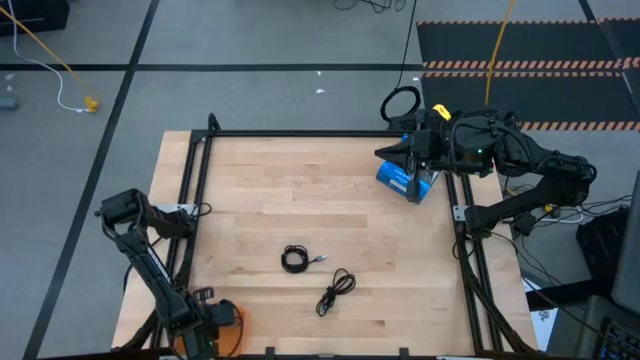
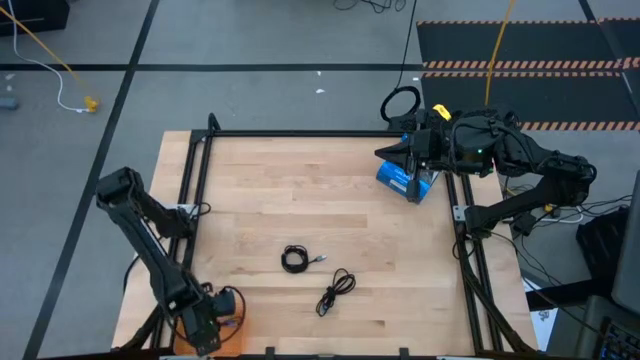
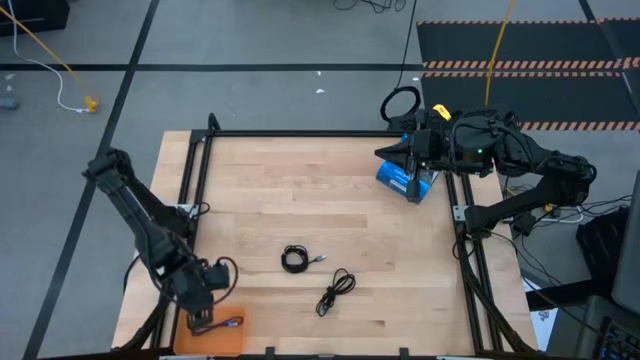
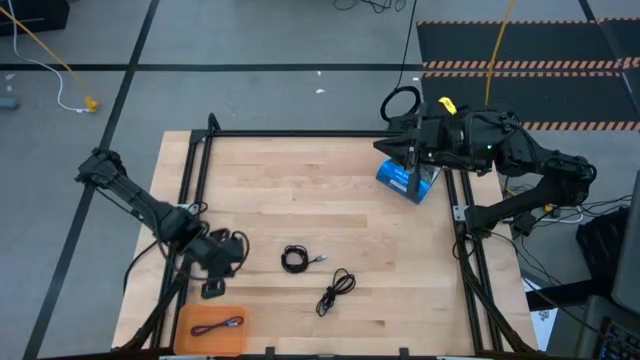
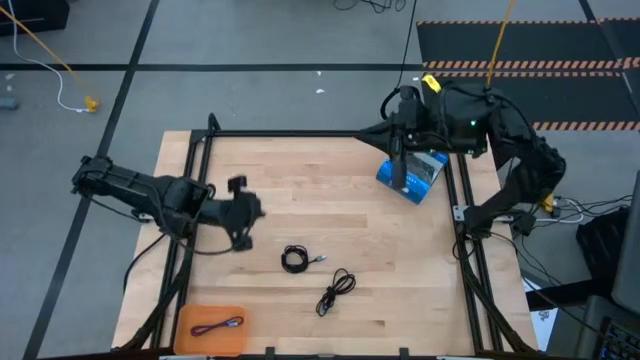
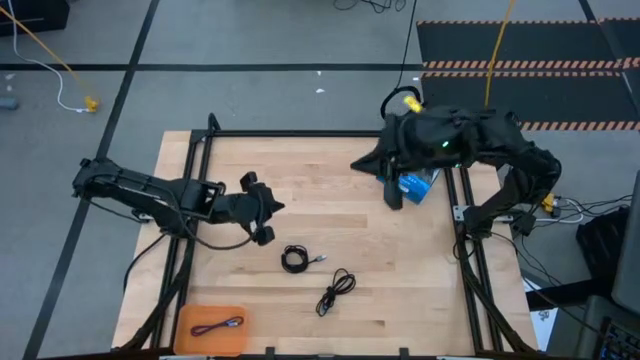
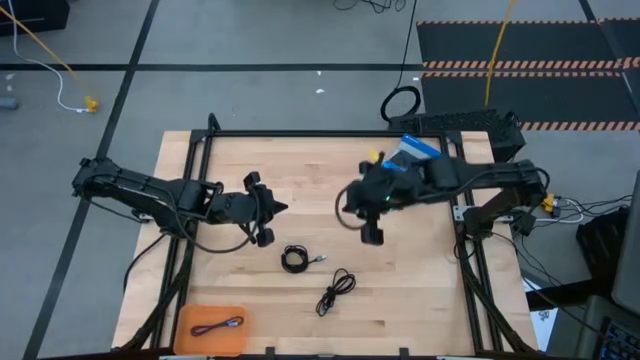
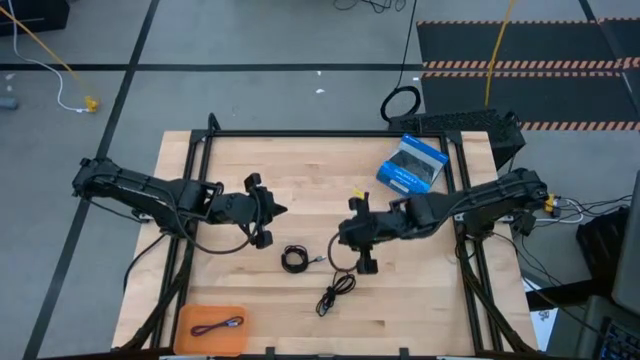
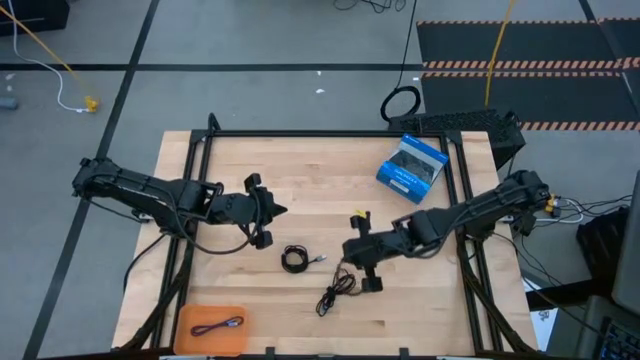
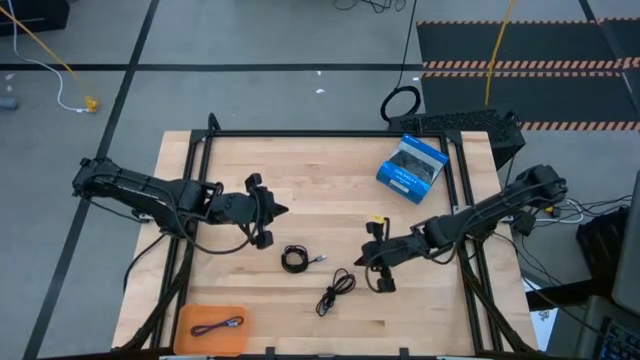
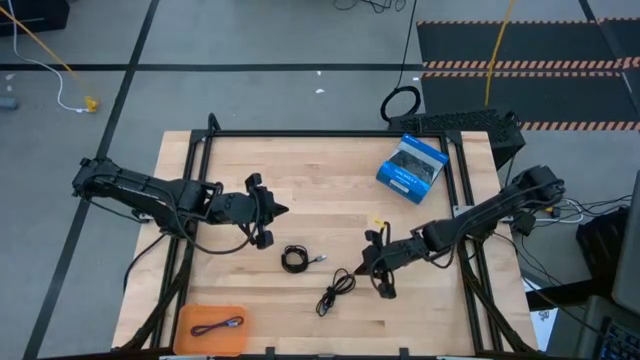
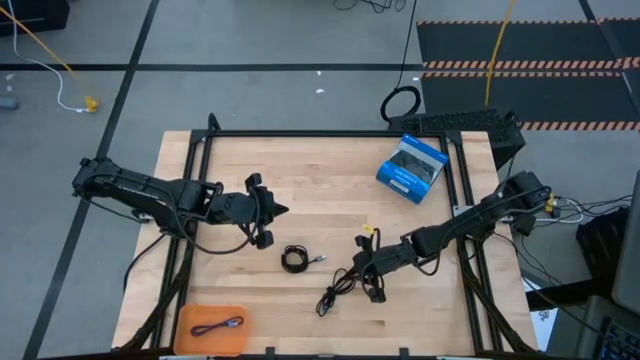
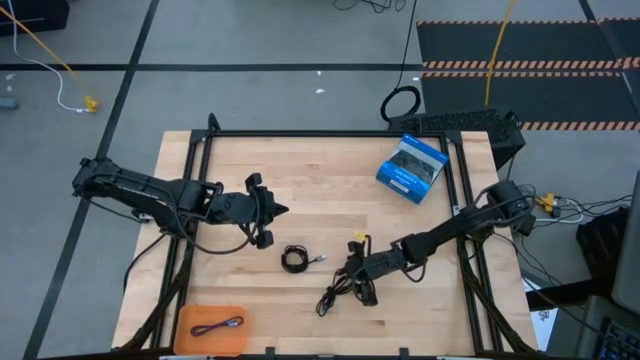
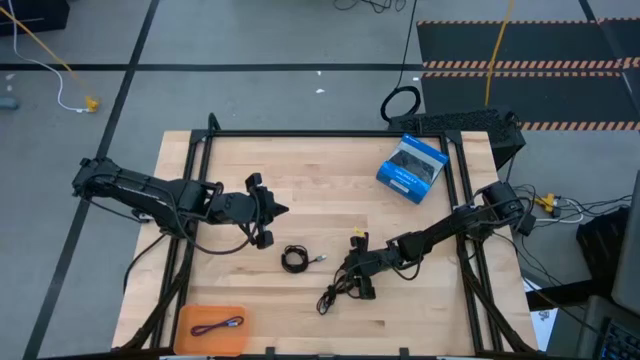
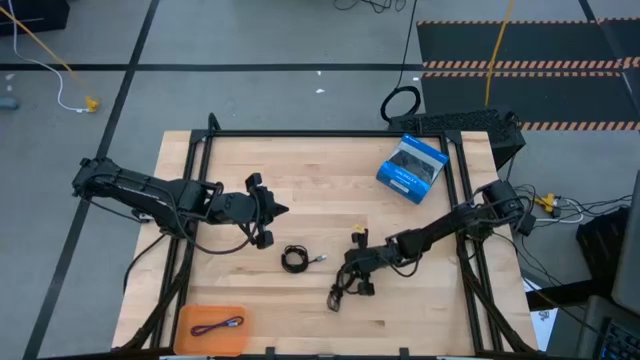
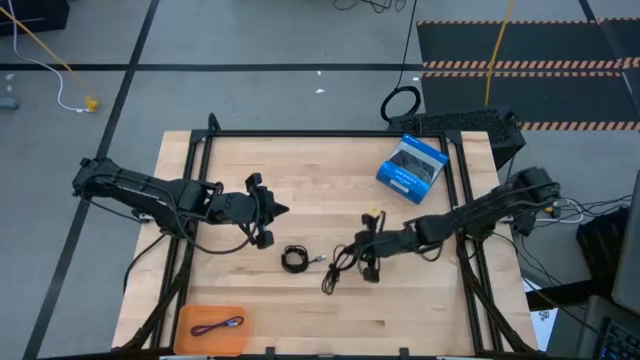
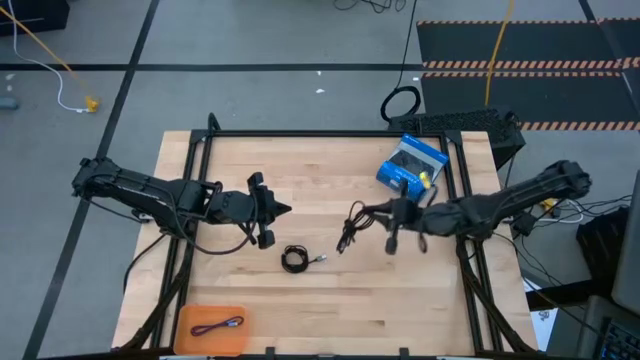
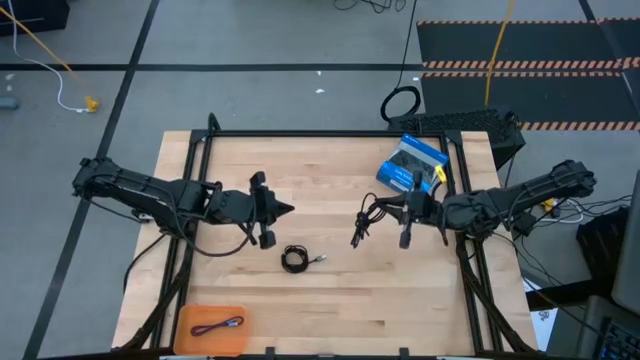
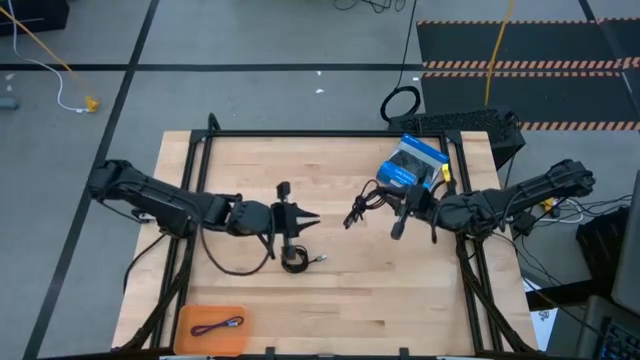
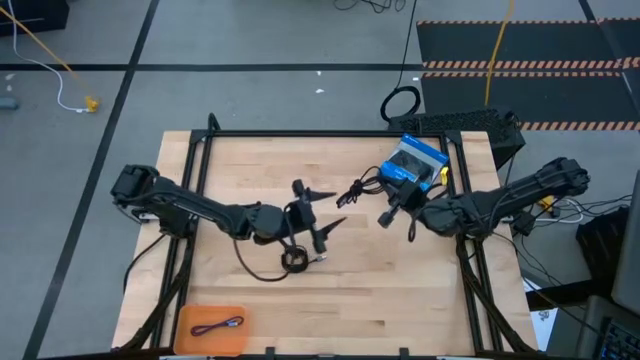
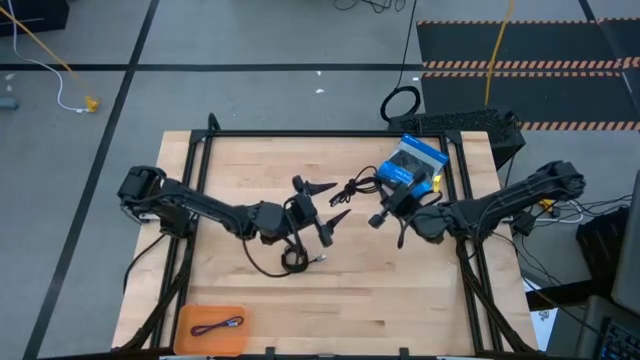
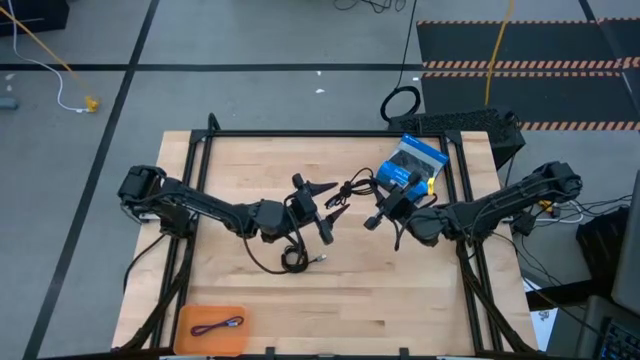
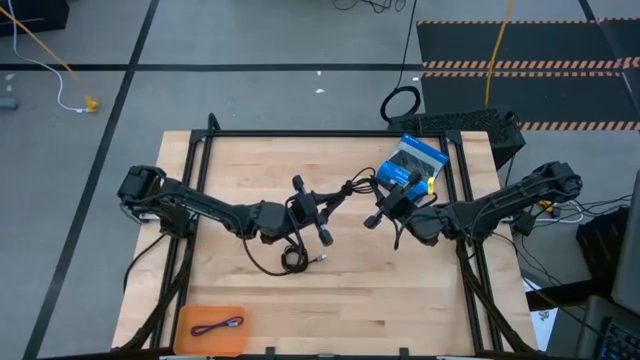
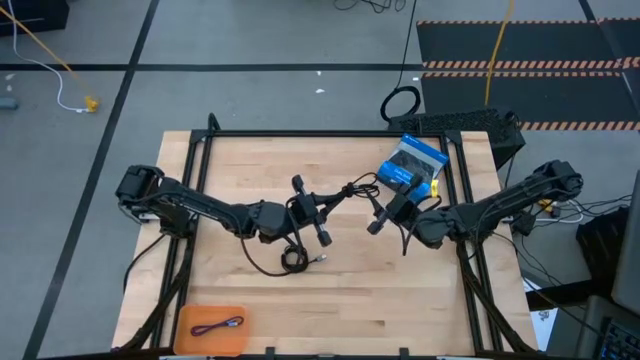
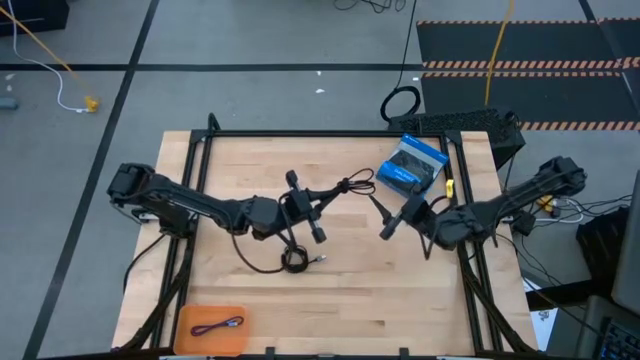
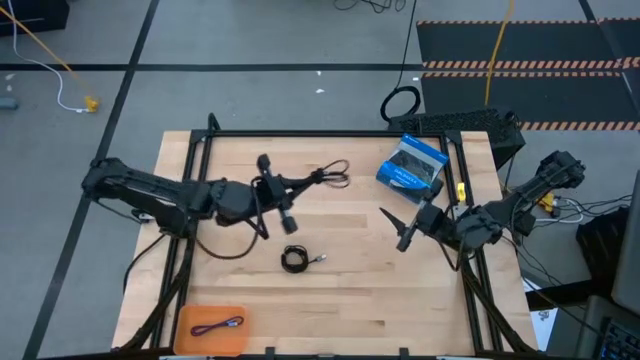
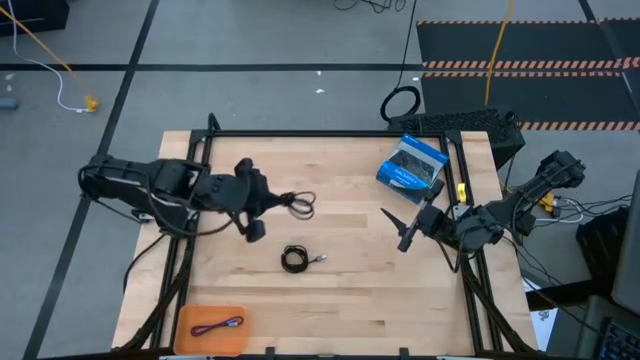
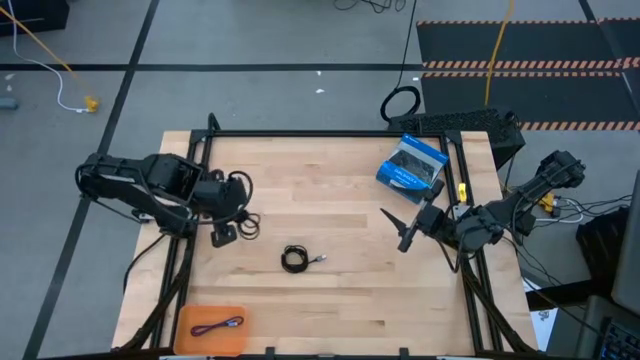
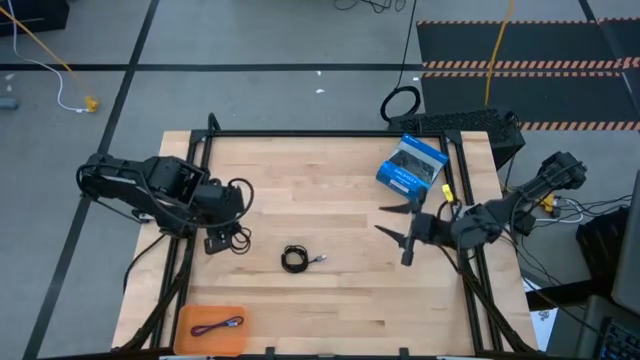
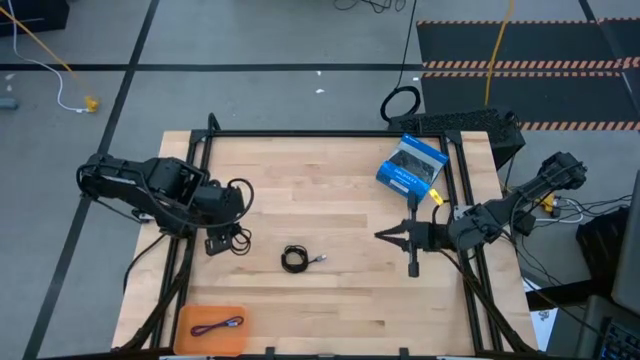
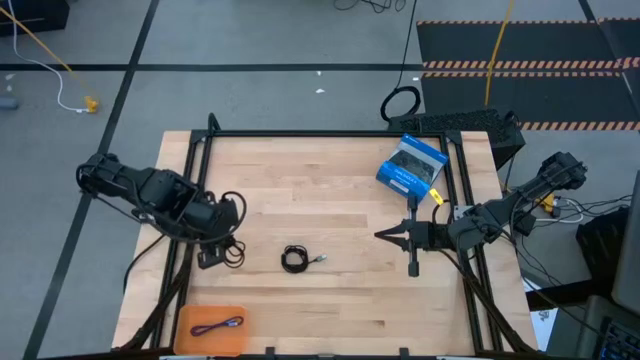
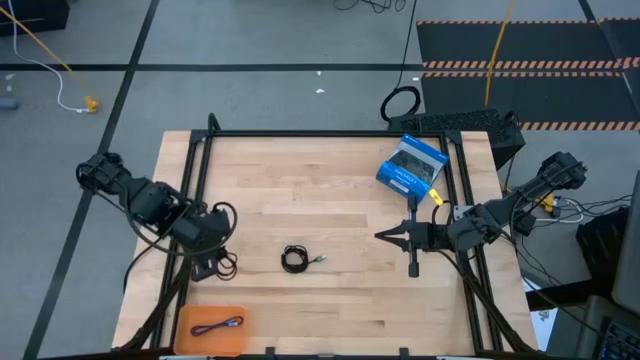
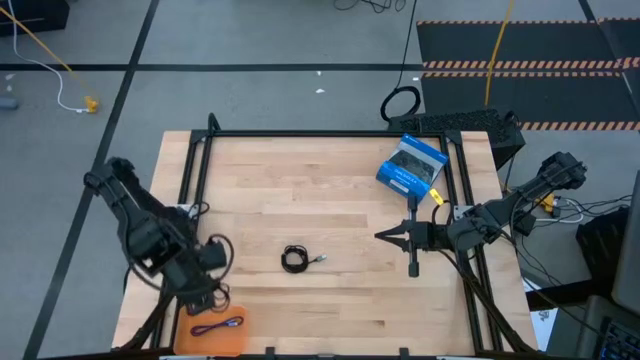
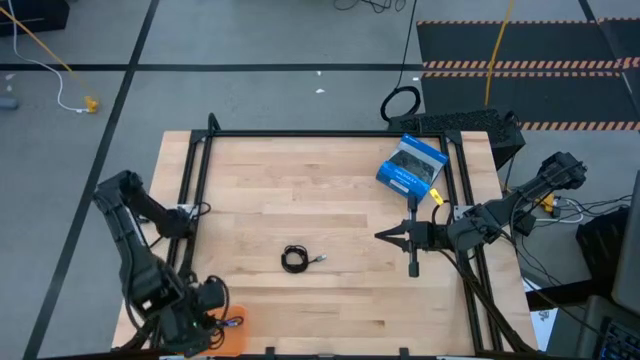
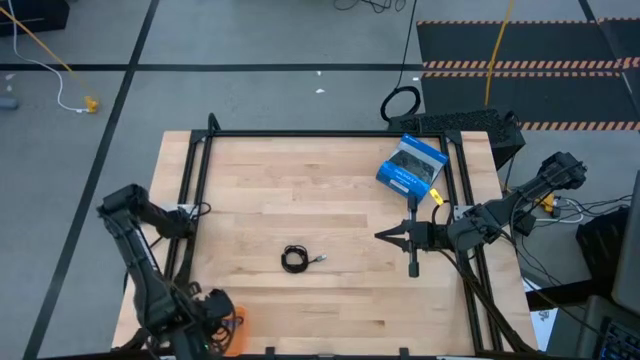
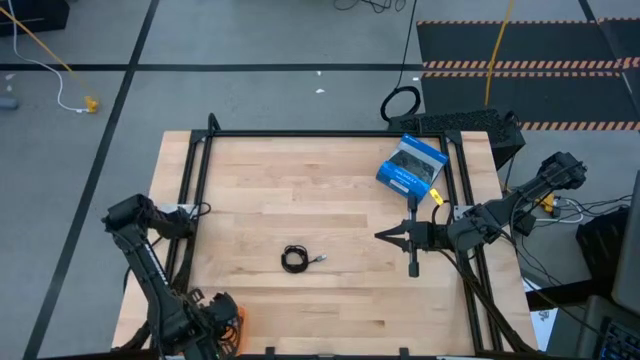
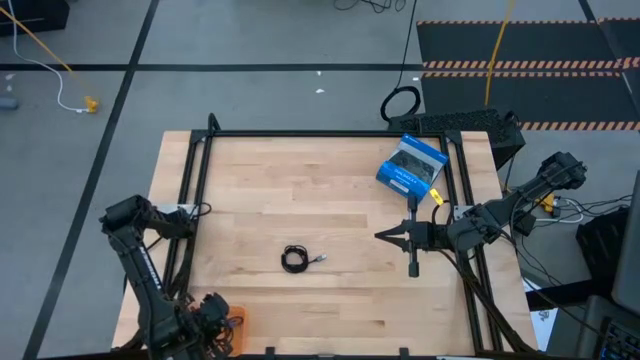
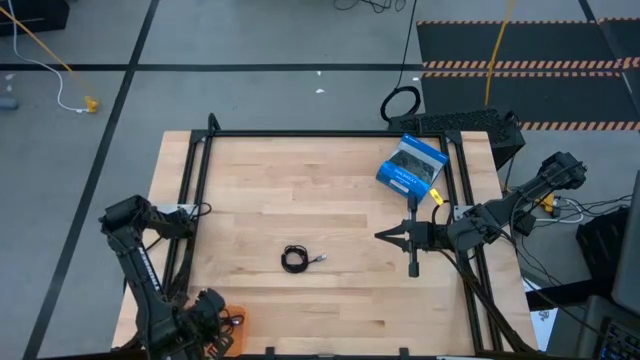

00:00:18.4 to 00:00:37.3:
Task: Pick and place USB-C Cables
Put the bottom black cable charger into the orange bin

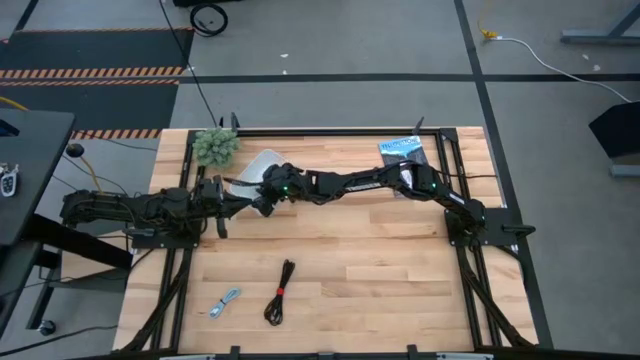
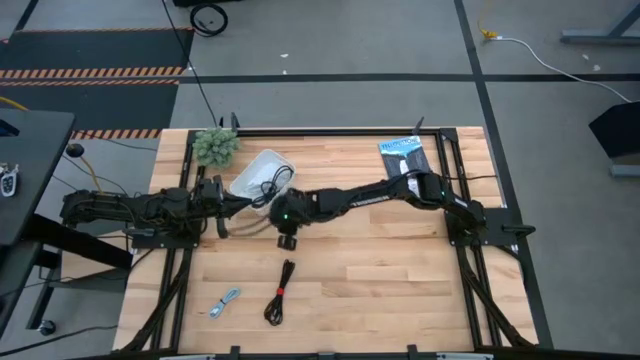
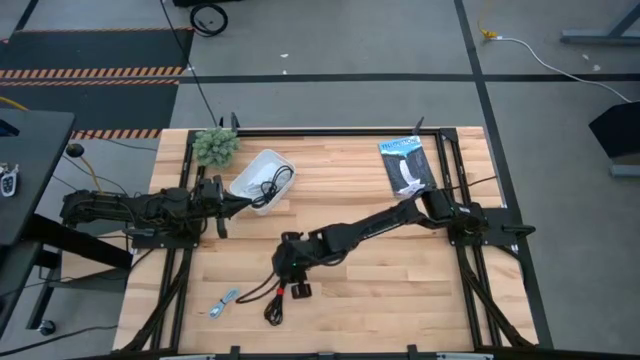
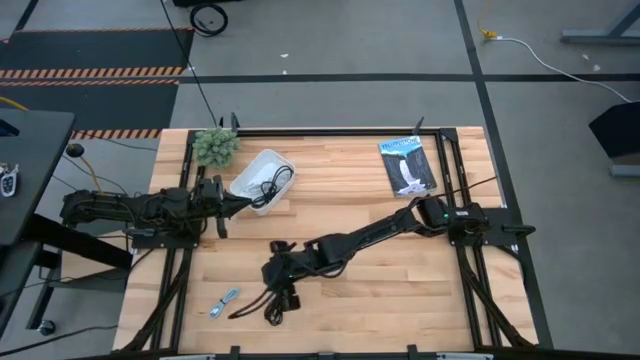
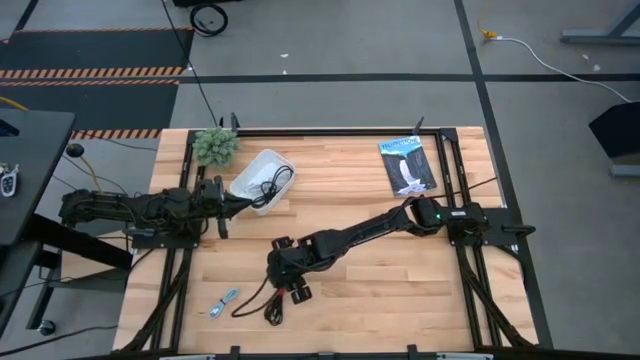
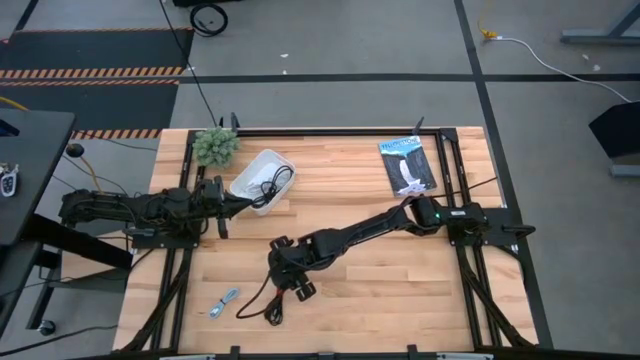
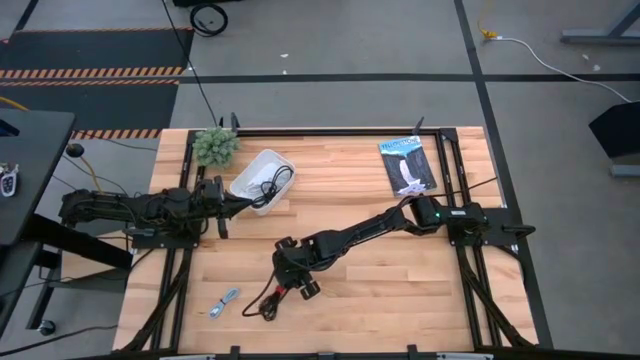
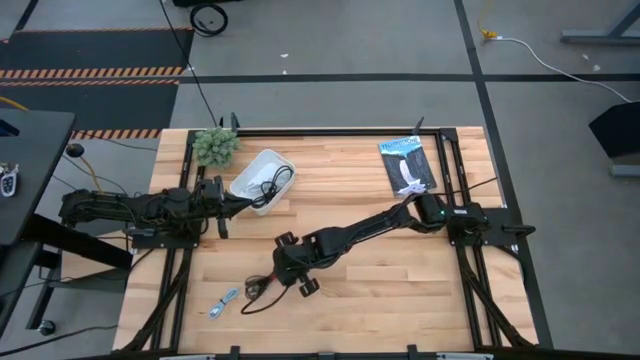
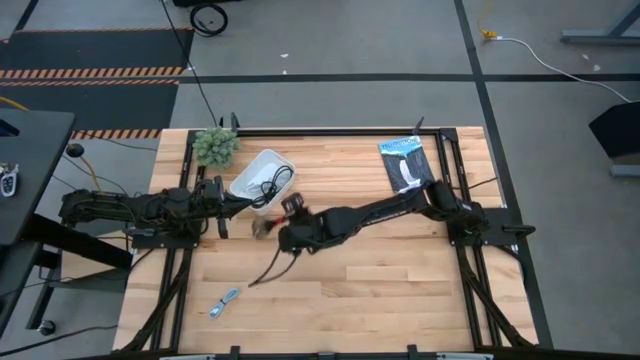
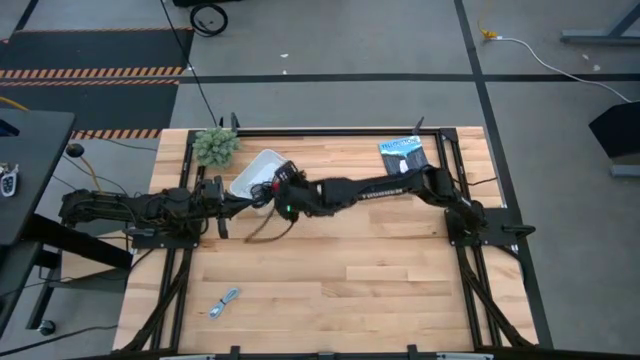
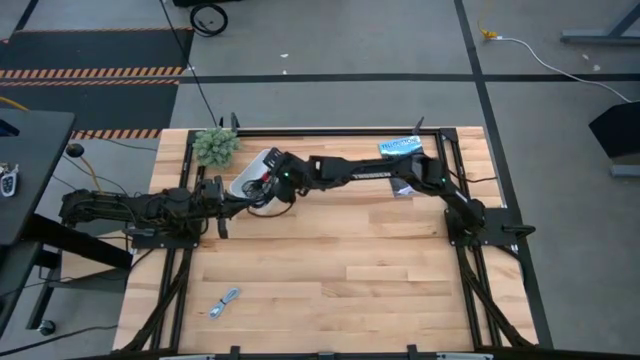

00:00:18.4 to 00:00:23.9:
Task: Pick and place USB-C Cables
Put the black charger cable into the white bin
